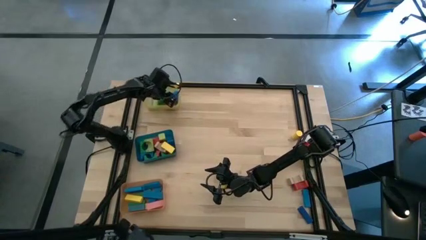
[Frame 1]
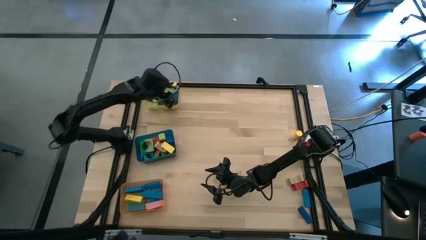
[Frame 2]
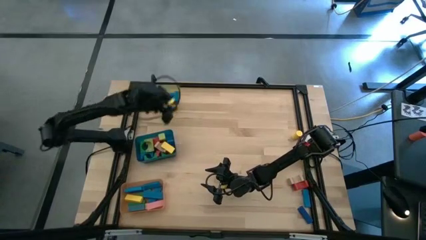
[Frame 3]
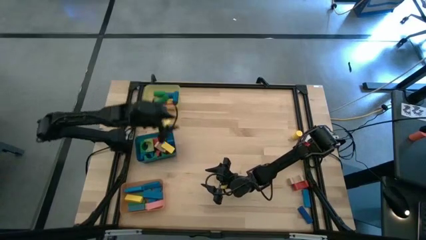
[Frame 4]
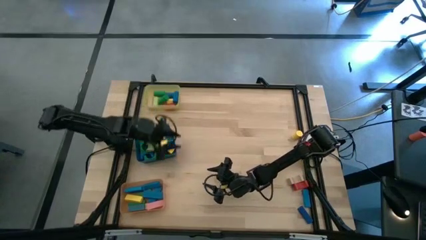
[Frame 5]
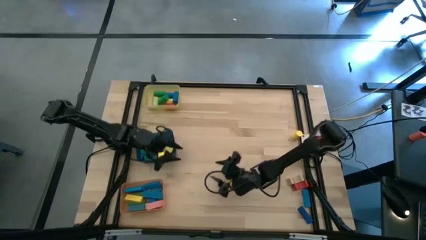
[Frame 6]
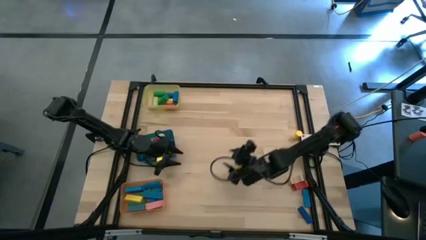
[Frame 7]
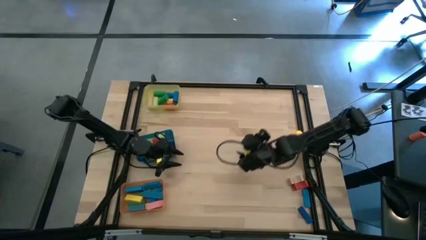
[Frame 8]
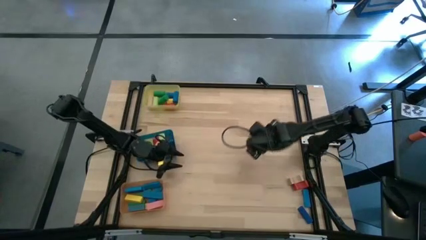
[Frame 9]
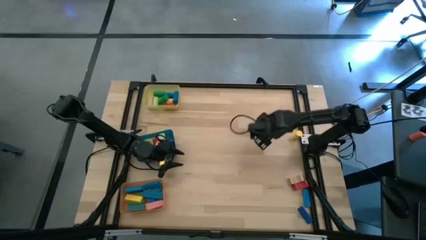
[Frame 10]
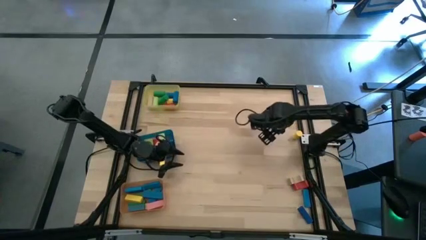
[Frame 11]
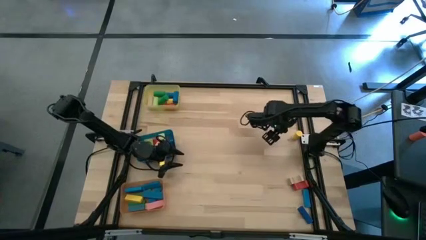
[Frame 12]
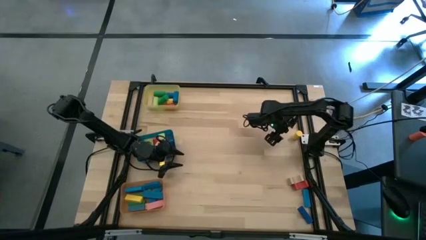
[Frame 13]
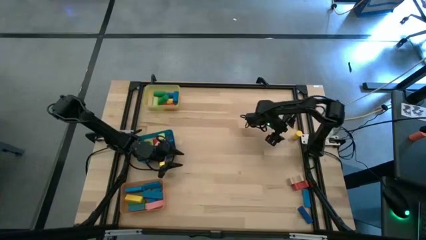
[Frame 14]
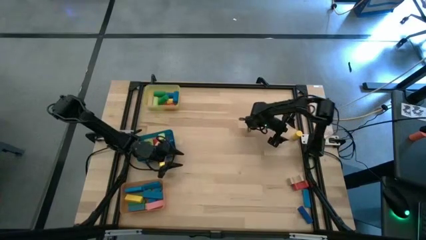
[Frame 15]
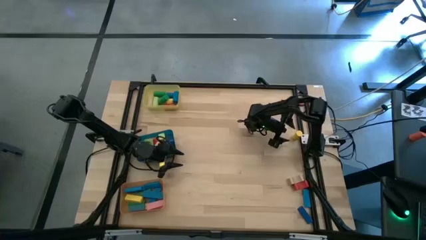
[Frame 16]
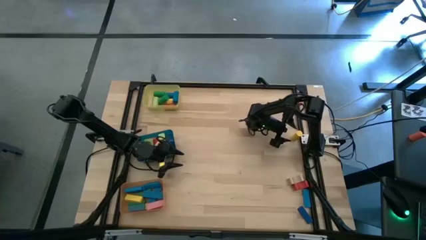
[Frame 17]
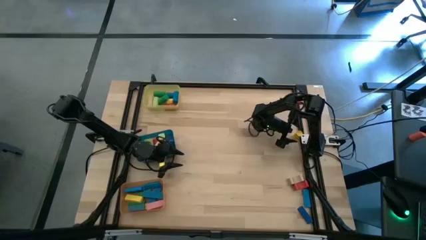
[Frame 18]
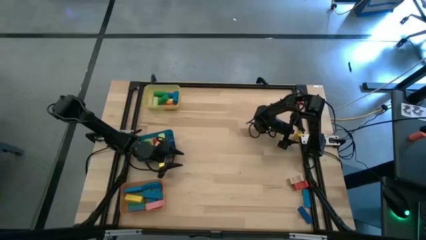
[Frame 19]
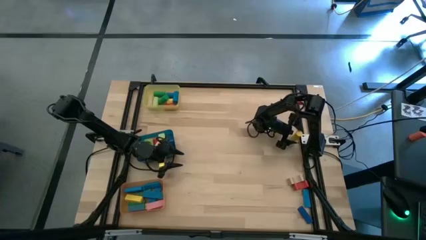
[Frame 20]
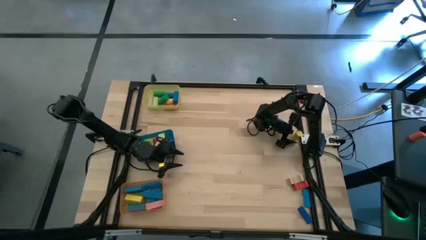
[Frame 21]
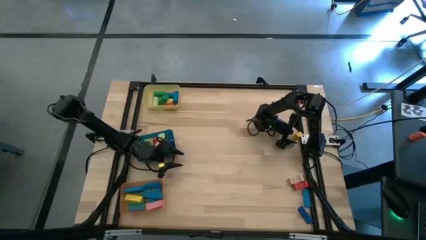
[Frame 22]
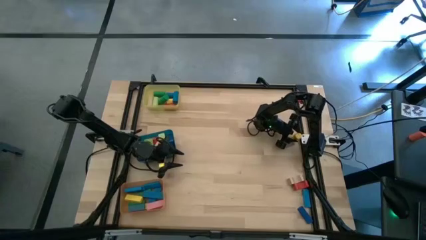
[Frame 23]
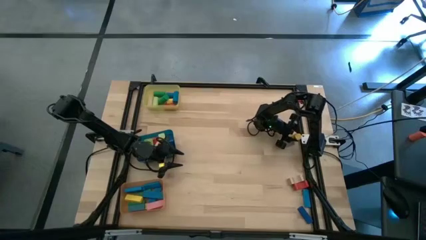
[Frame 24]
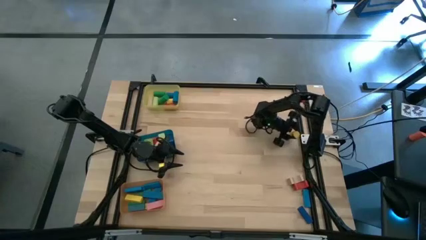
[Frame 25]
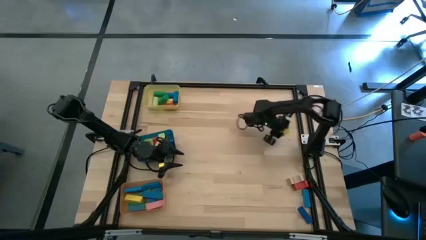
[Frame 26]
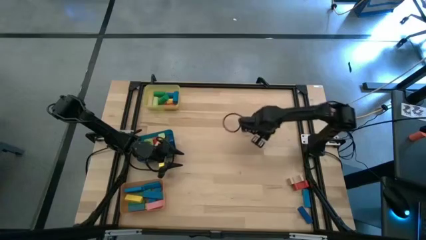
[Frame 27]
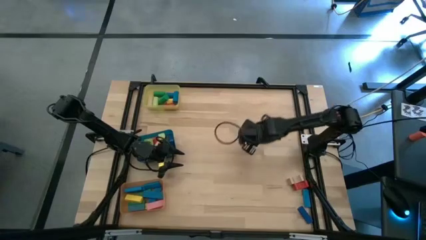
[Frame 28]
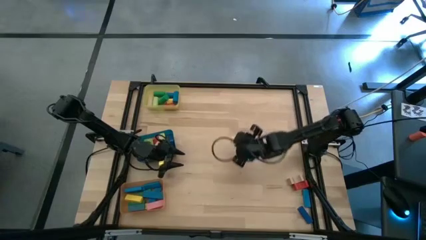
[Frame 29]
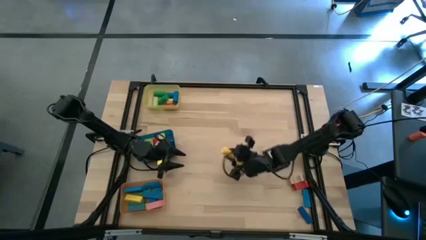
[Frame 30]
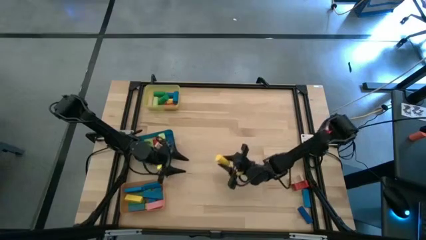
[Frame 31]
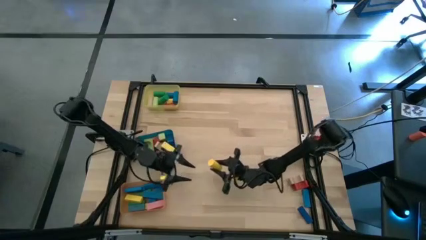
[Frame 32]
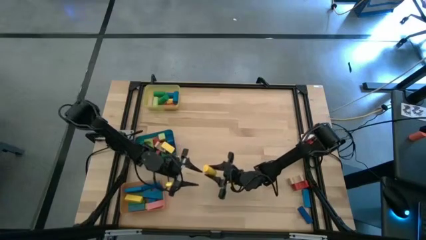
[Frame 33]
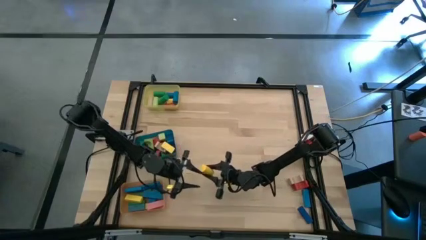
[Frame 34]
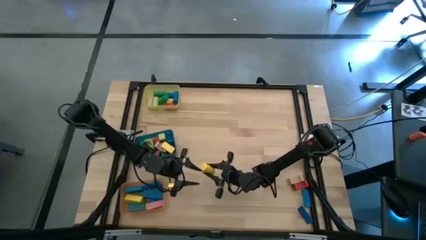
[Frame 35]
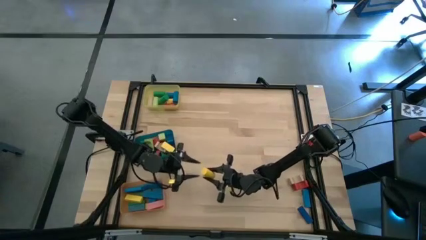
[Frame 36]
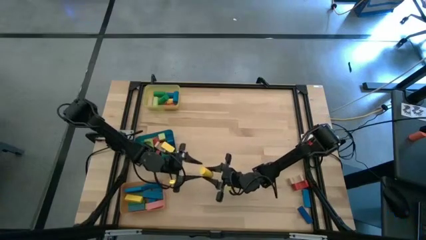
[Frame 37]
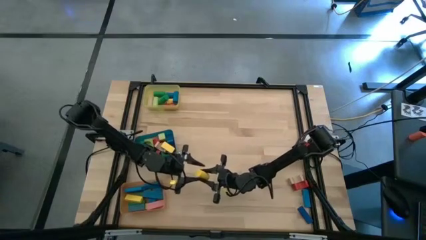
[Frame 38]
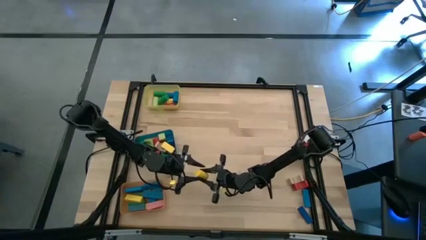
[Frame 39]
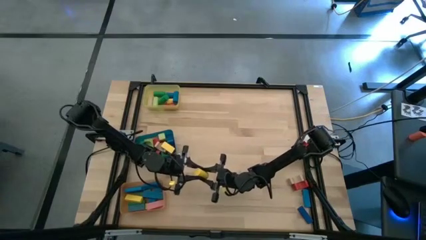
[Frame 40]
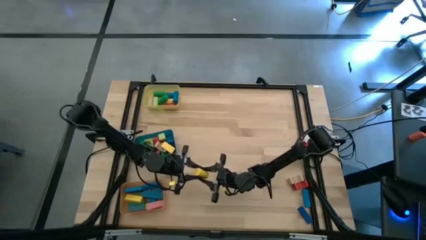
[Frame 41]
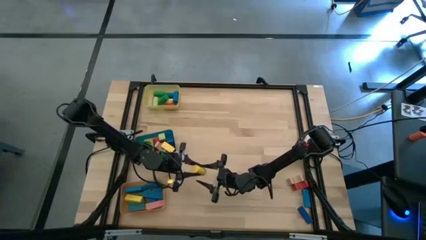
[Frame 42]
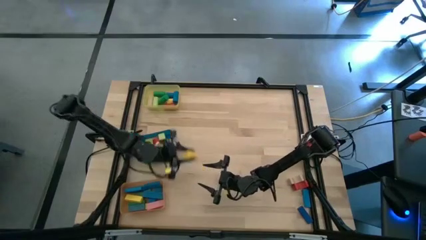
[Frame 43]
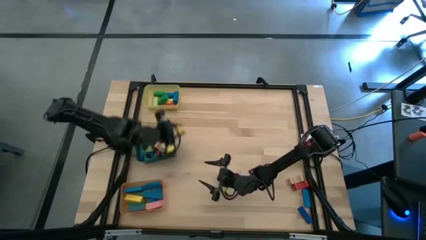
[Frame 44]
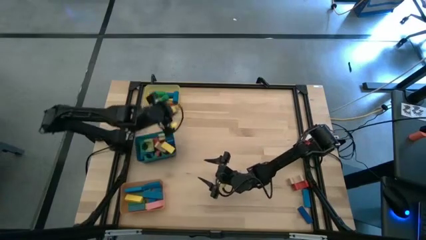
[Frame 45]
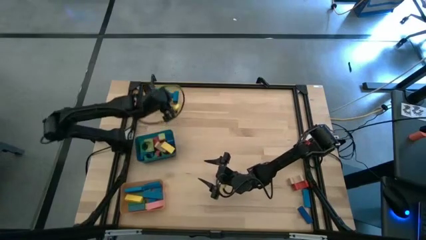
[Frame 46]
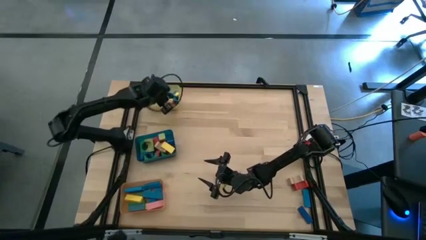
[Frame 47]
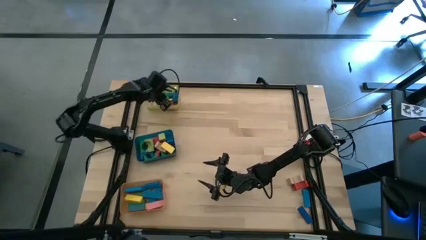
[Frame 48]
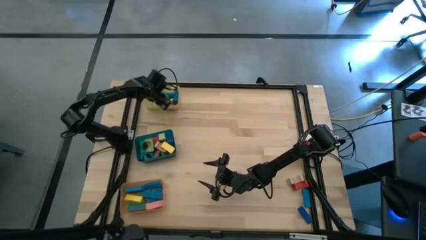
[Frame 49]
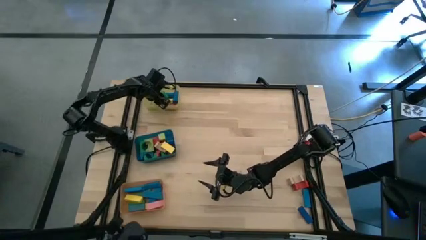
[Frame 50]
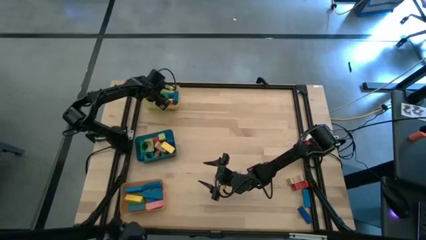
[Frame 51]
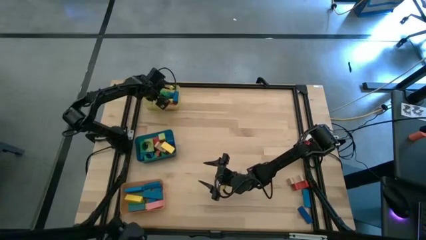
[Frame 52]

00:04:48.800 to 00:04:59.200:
Task: Sort blocks by size
Put the yellow cylindrical block into the yellow bin

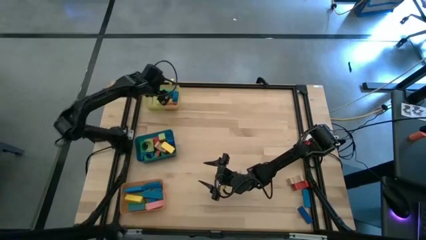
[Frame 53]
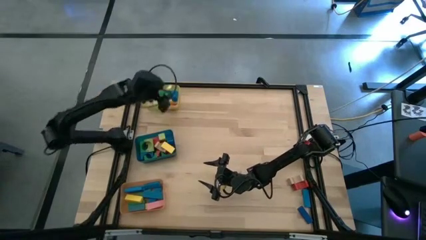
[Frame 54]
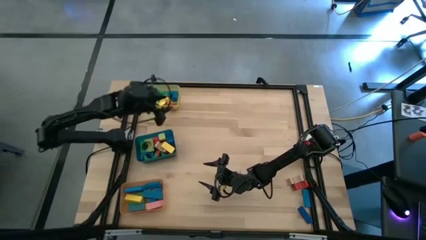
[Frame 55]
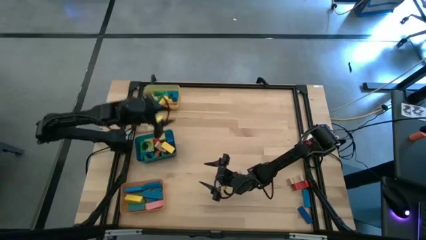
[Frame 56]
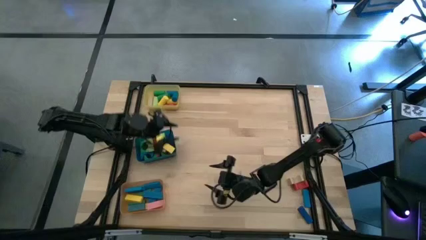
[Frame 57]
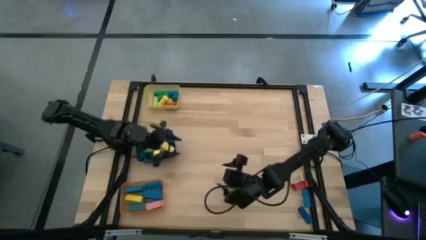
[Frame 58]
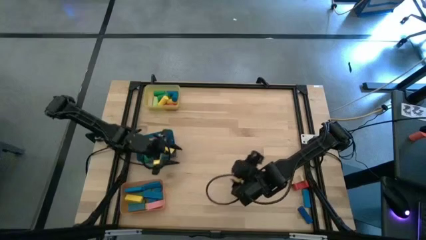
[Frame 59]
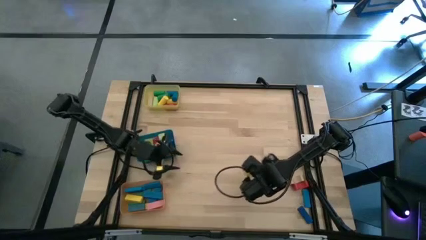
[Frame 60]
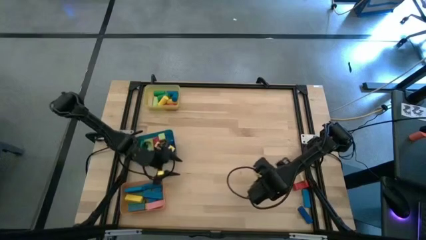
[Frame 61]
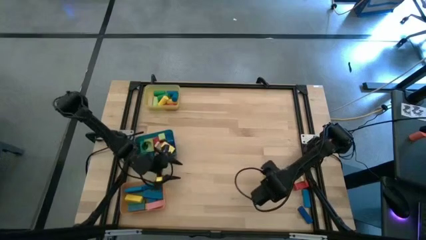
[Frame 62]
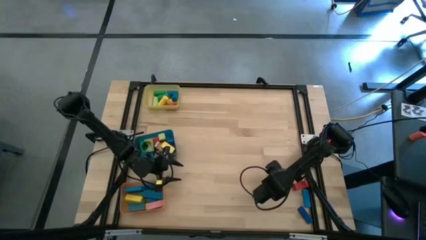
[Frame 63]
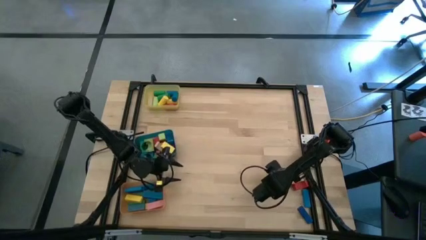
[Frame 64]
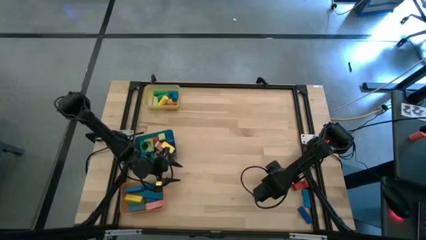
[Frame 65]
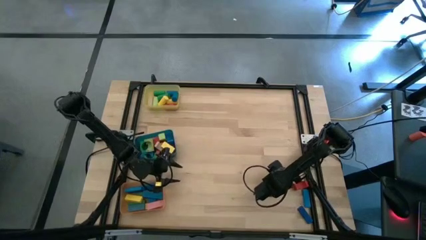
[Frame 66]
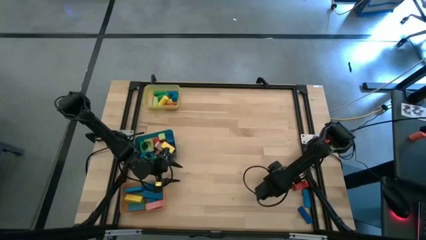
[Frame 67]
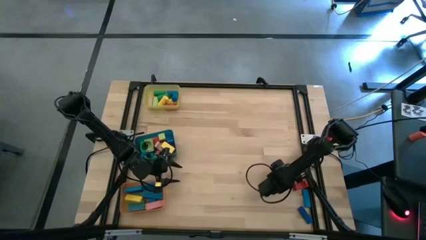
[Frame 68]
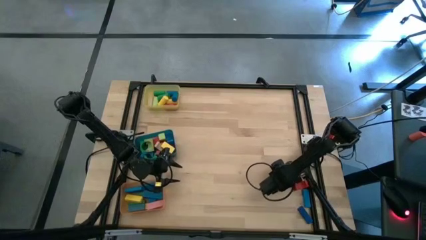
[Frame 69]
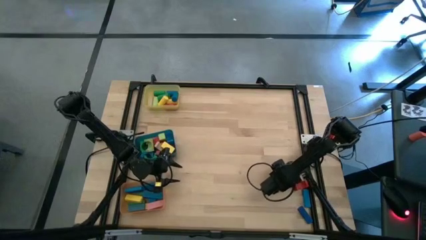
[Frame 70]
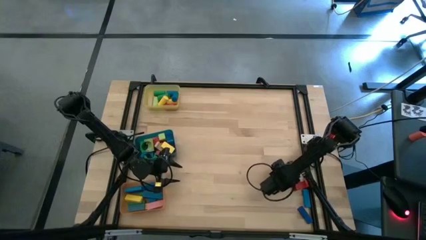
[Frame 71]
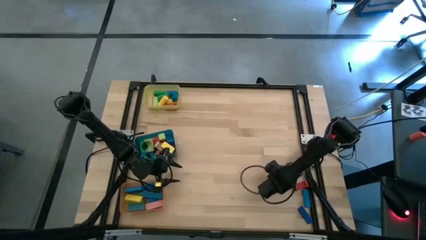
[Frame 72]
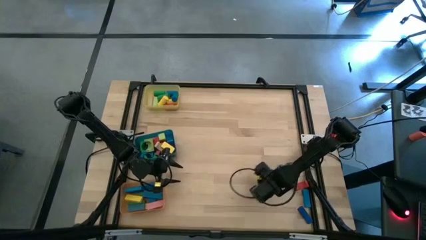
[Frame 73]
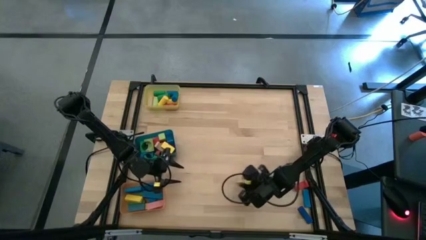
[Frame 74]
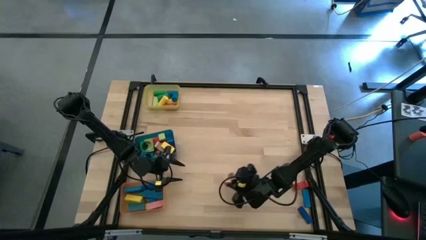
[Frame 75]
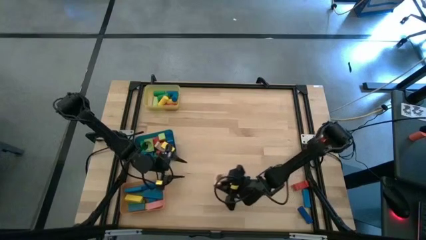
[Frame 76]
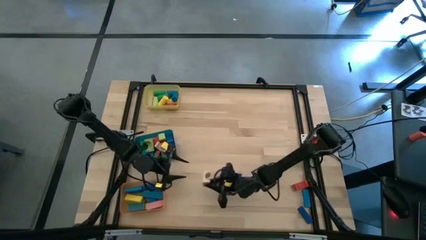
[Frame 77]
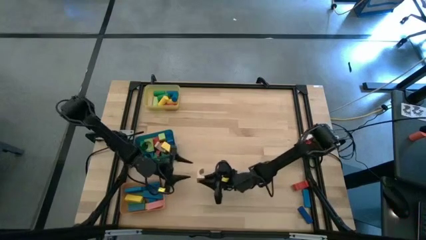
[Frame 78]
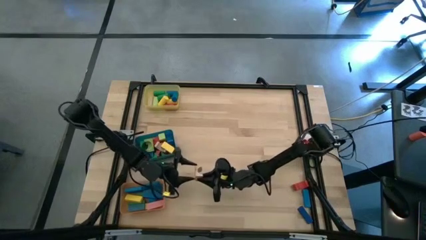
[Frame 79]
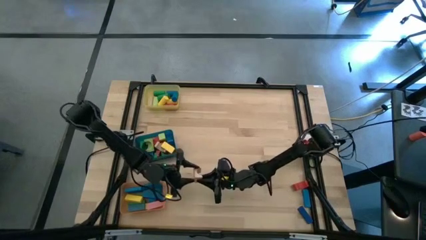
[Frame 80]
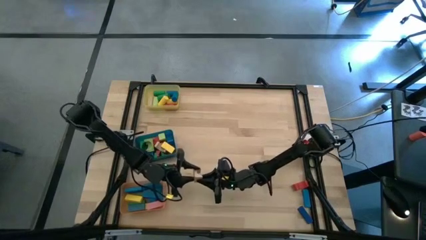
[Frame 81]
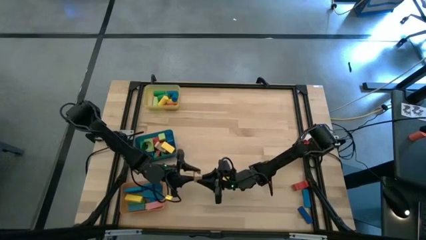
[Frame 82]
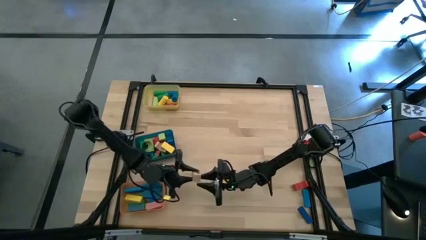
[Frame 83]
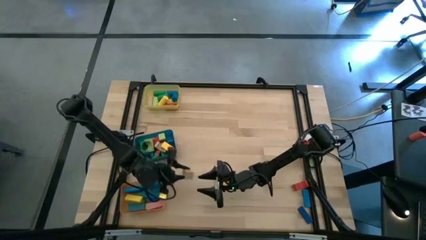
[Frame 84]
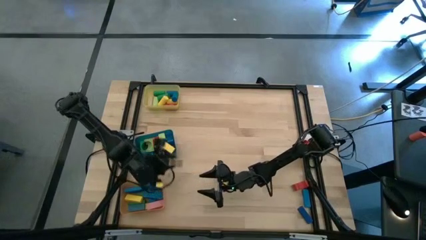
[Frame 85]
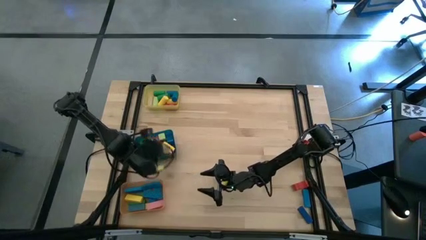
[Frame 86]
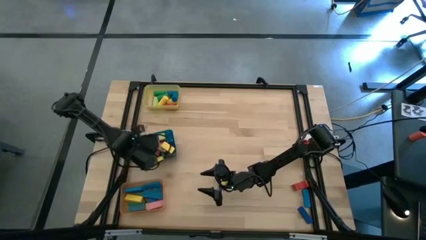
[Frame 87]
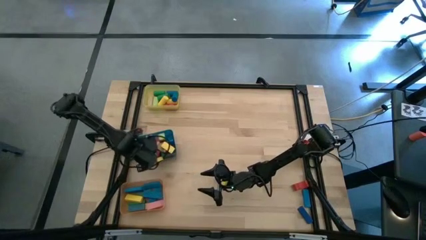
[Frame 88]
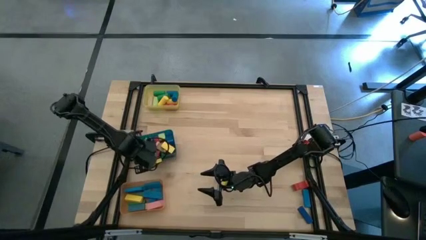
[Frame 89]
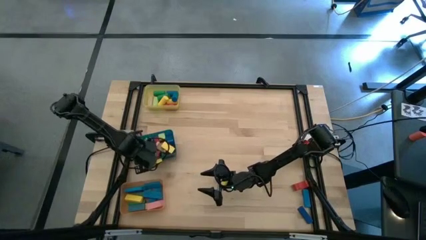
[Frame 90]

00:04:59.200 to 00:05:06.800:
Put the brown arch block into the blue bin
